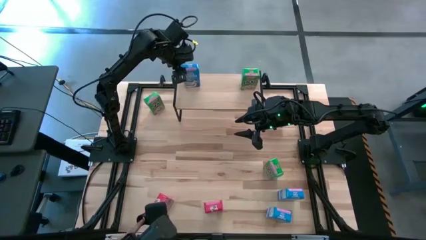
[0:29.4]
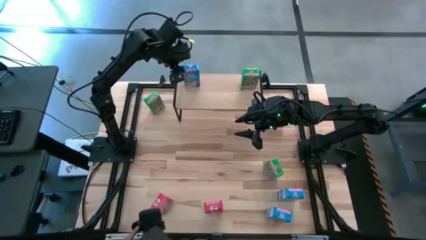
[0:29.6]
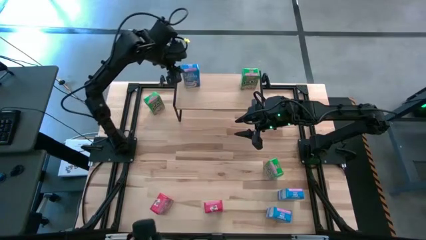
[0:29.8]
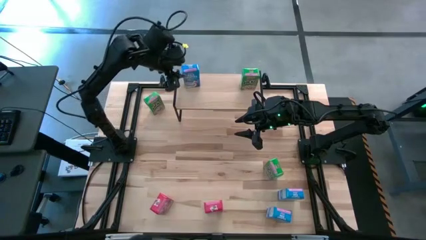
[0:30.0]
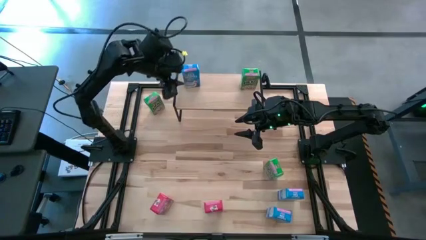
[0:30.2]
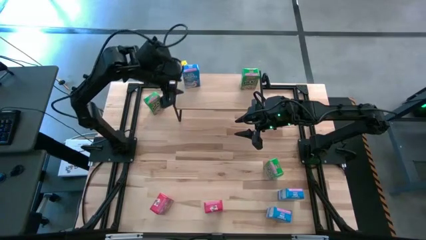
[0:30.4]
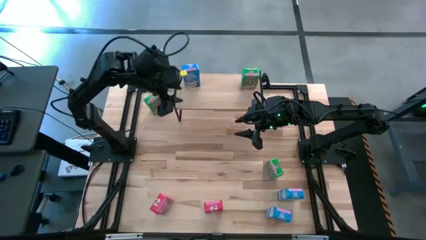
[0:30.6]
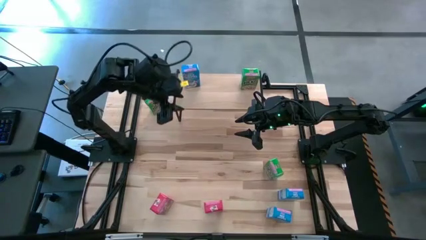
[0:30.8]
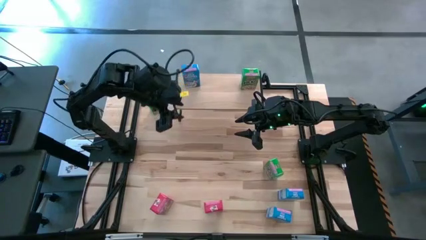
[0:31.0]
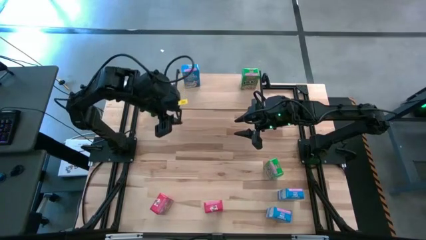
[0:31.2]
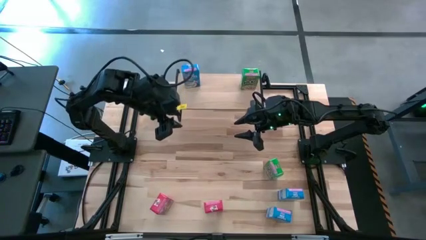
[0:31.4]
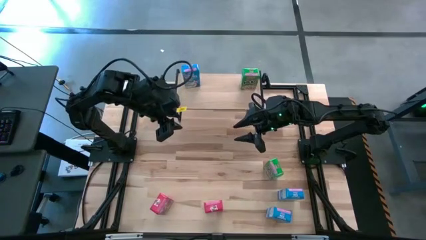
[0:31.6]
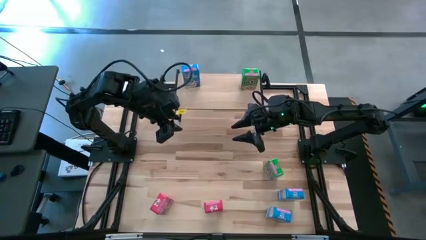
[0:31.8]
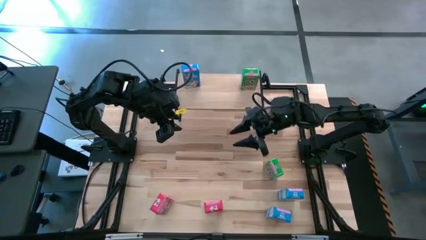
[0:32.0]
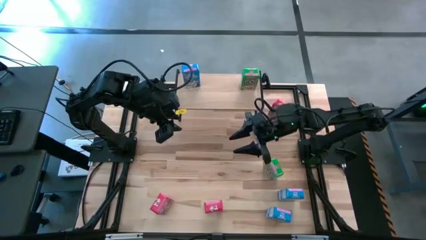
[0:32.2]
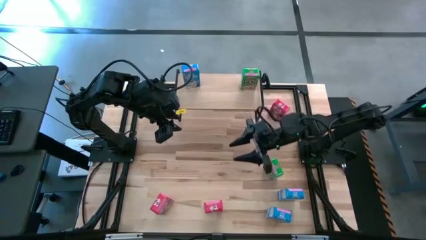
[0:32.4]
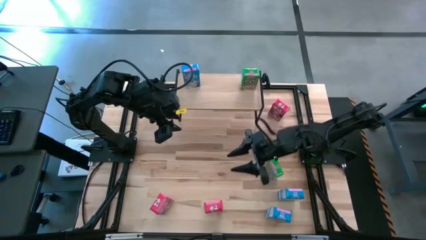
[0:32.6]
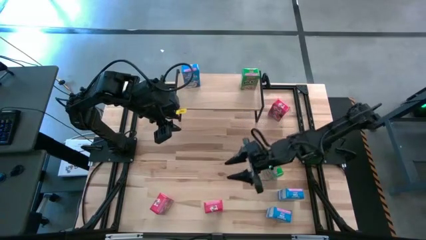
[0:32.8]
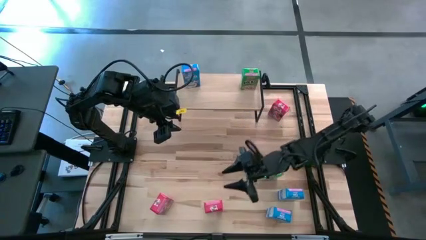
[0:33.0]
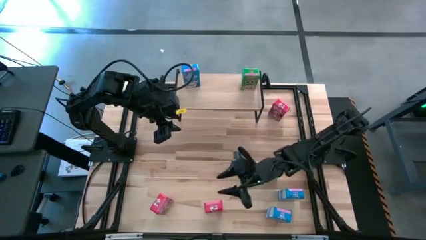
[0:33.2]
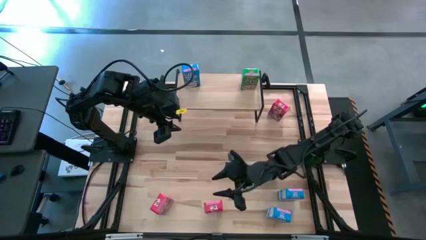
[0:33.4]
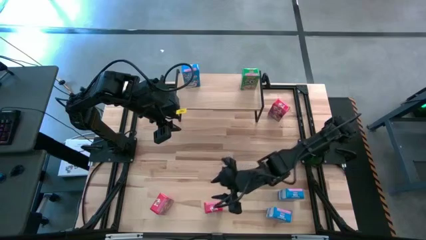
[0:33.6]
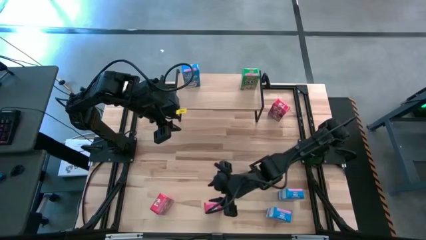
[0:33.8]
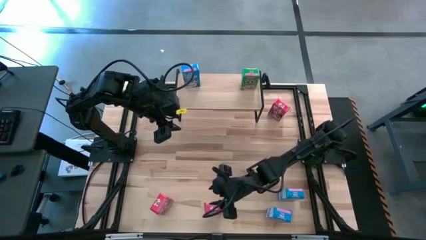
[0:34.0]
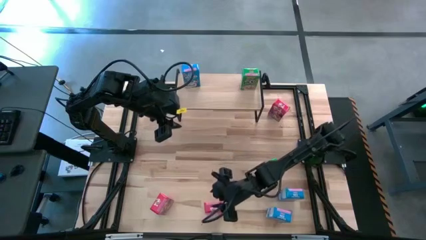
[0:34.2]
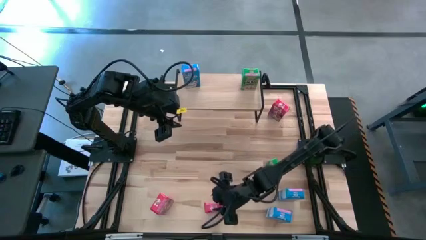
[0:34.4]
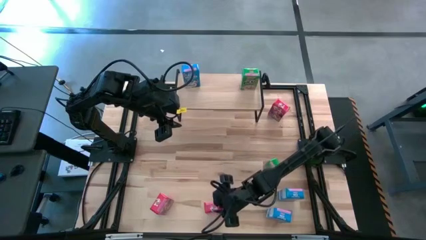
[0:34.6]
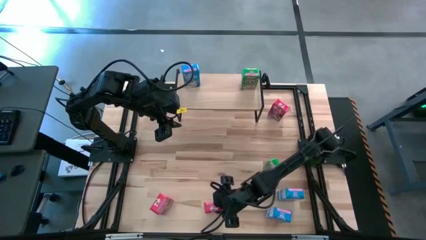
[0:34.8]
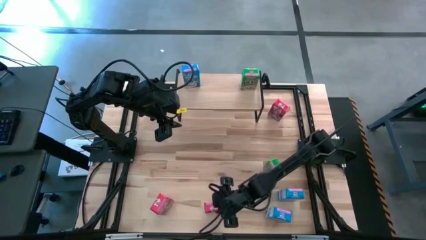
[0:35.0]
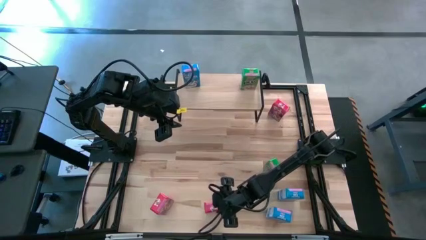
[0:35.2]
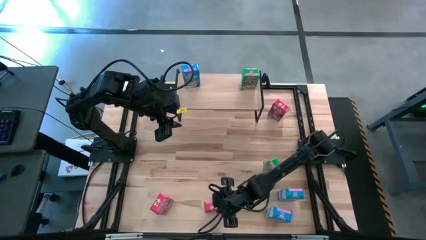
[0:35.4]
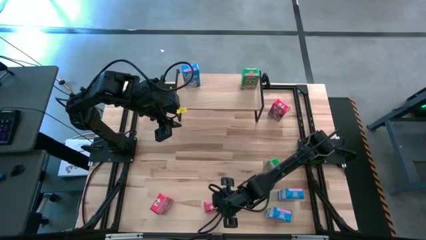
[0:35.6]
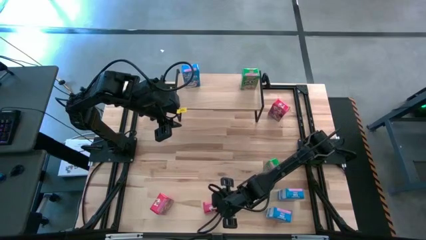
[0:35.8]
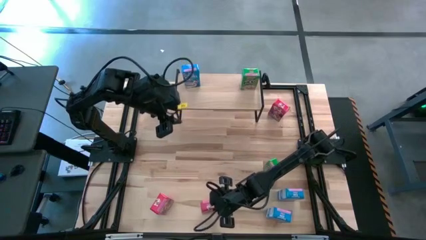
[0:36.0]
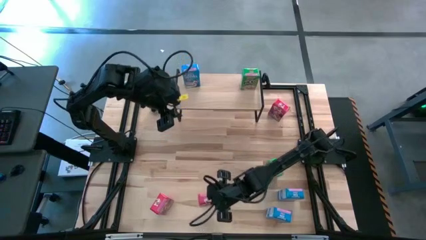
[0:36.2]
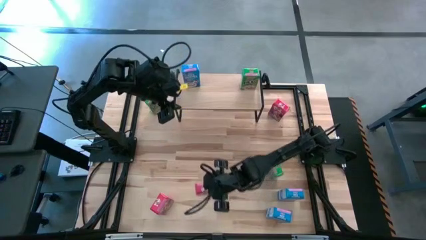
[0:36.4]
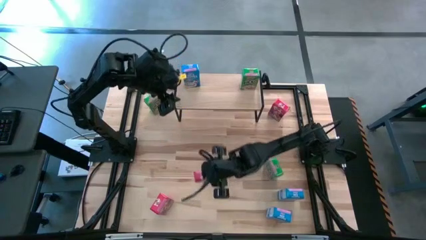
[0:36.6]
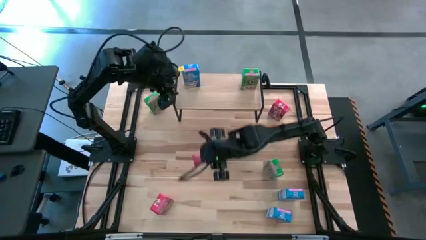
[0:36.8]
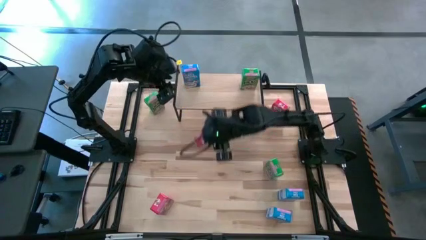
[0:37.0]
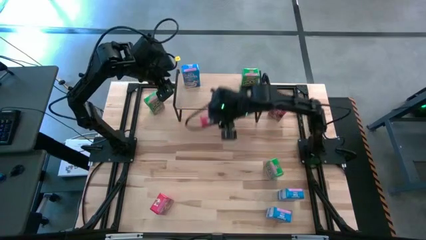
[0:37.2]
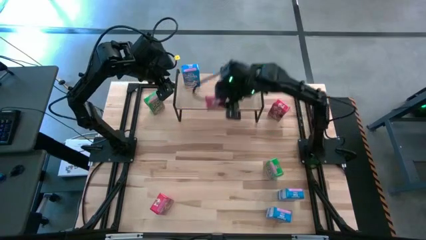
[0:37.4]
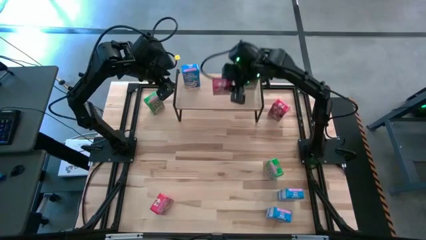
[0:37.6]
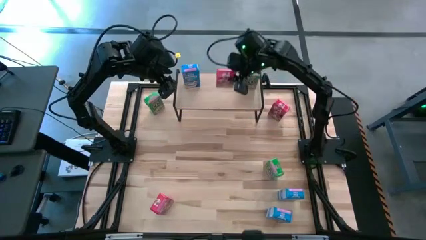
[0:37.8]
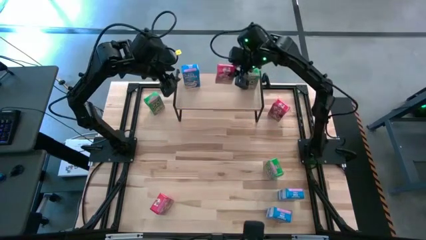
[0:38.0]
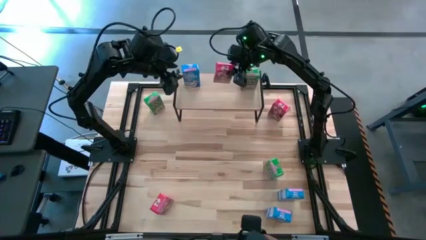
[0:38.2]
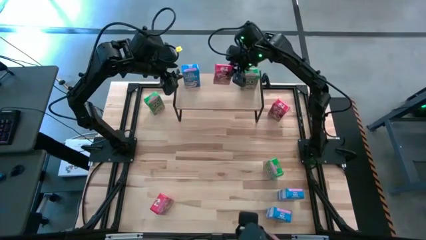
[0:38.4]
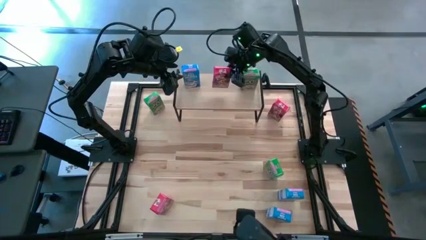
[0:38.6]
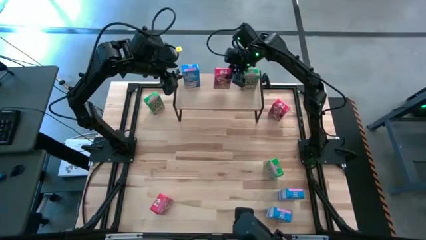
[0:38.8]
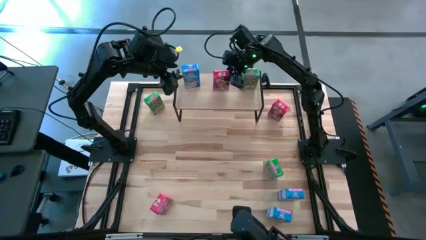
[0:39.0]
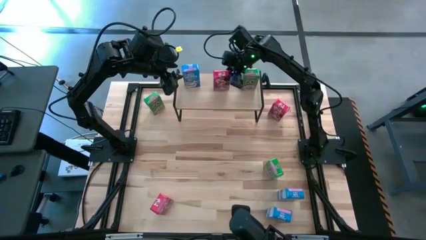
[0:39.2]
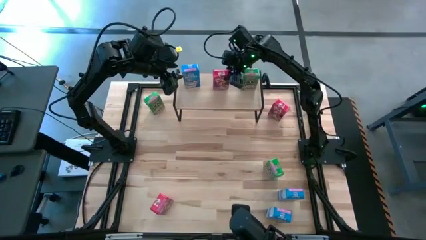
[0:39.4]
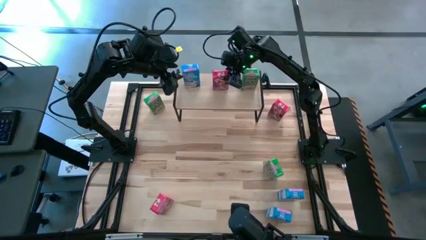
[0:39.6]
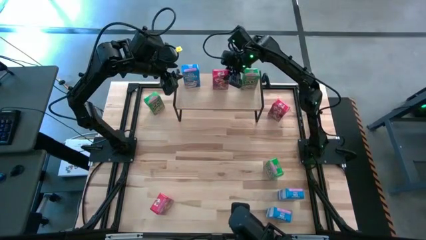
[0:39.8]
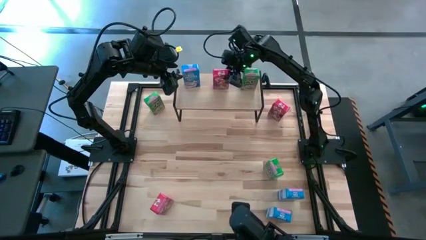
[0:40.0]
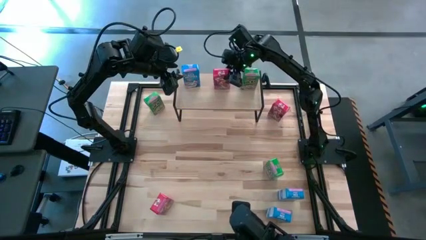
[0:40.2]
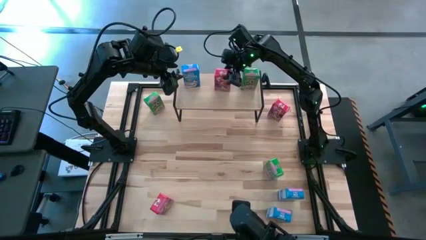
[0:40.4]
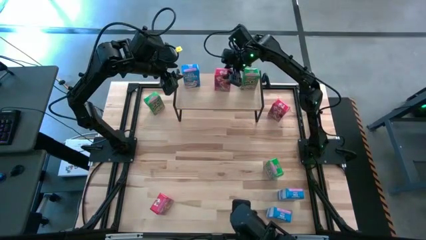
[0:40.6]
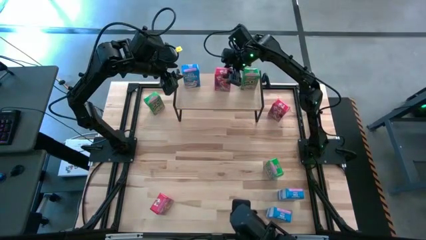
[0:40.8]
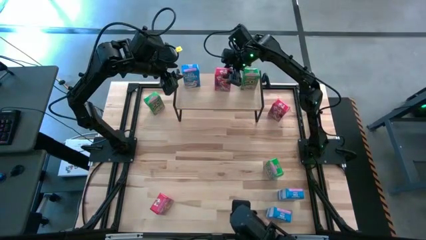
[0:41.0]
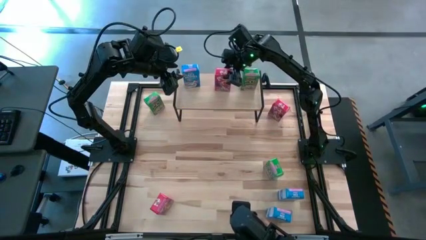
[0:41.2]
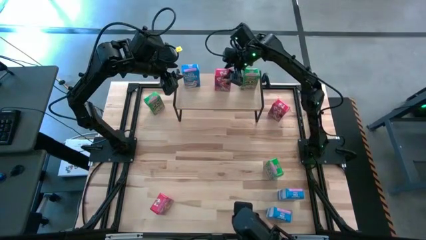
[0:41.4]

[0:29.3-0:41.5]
Task: Stack cereal on shelf
Put the bottom right red cereal box on the shelf

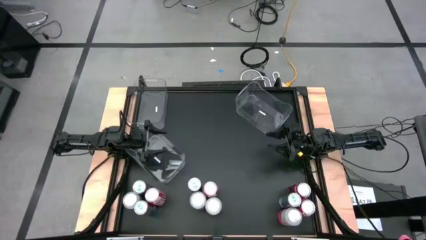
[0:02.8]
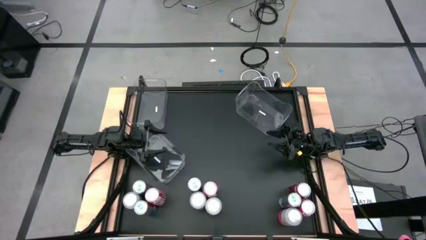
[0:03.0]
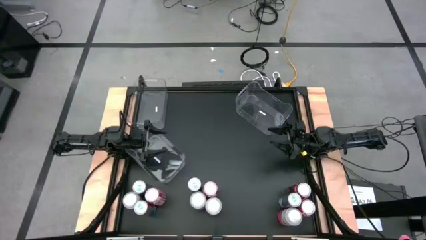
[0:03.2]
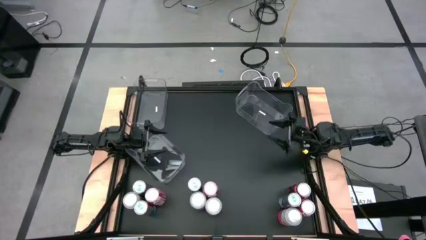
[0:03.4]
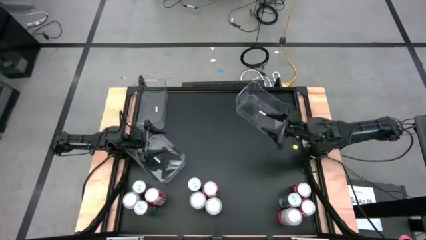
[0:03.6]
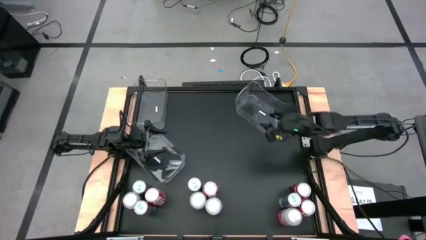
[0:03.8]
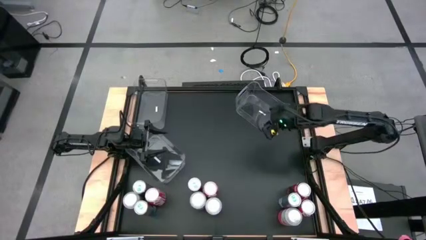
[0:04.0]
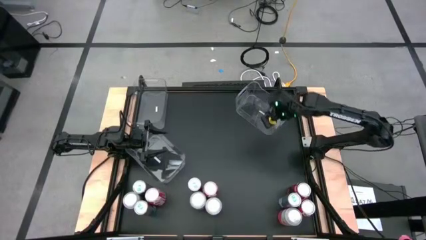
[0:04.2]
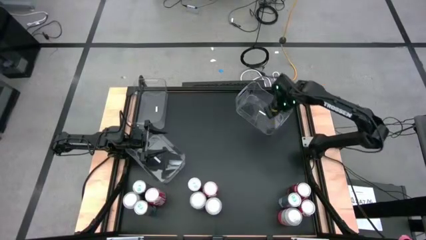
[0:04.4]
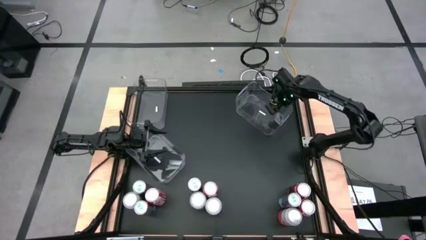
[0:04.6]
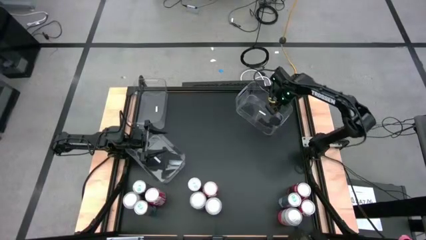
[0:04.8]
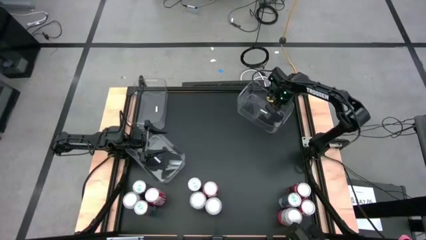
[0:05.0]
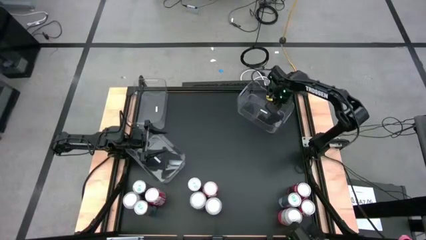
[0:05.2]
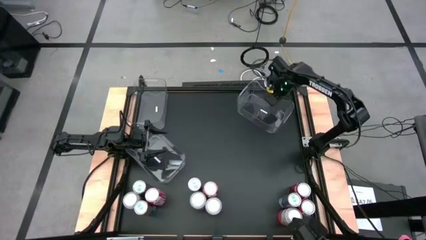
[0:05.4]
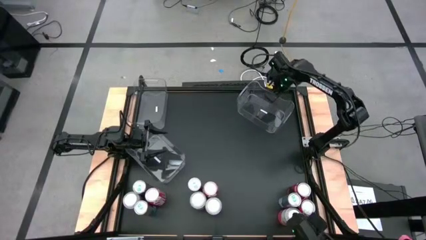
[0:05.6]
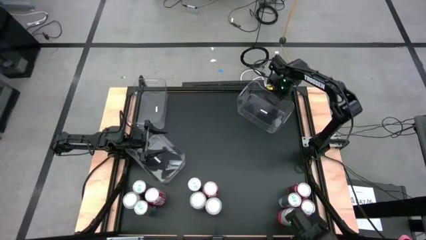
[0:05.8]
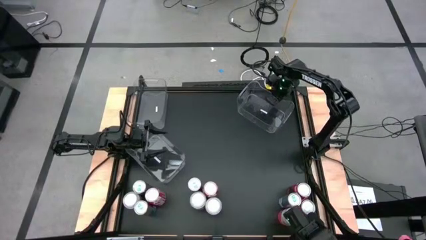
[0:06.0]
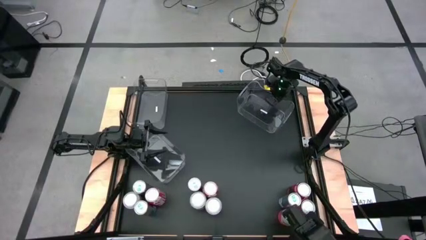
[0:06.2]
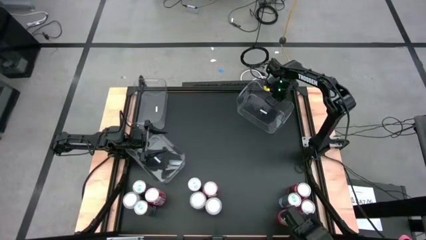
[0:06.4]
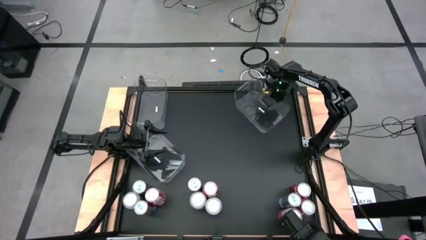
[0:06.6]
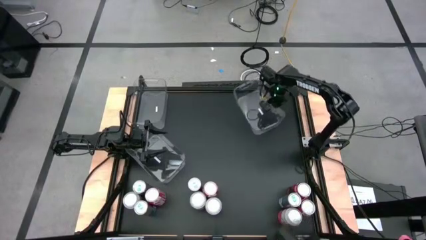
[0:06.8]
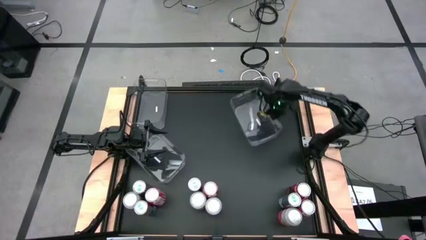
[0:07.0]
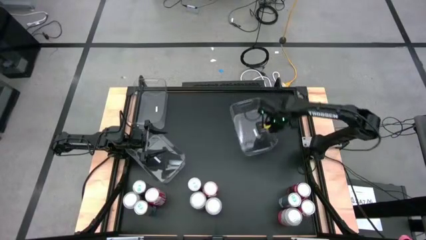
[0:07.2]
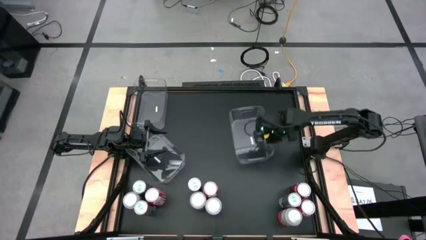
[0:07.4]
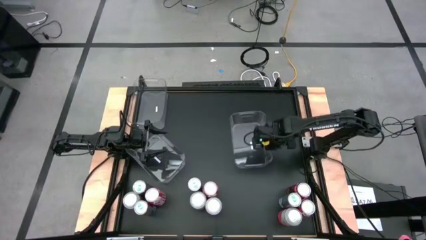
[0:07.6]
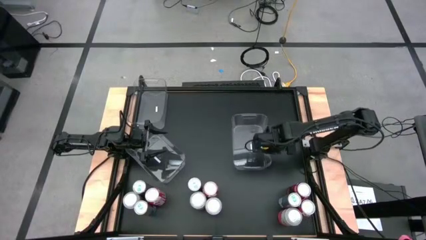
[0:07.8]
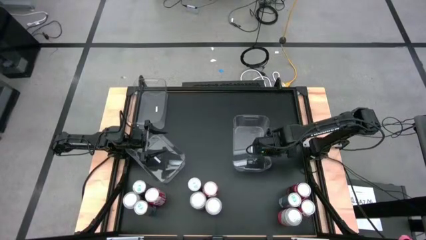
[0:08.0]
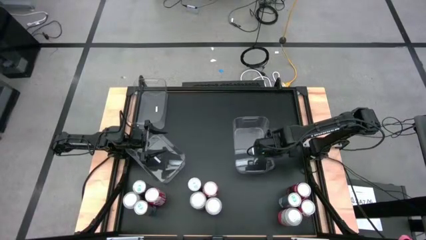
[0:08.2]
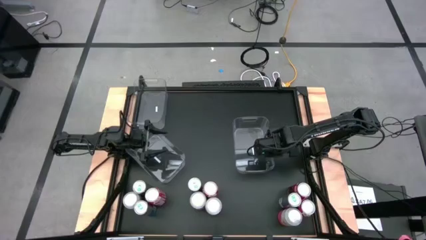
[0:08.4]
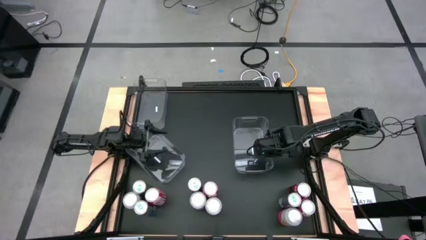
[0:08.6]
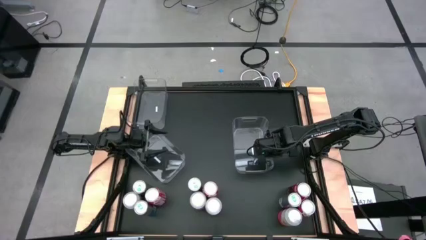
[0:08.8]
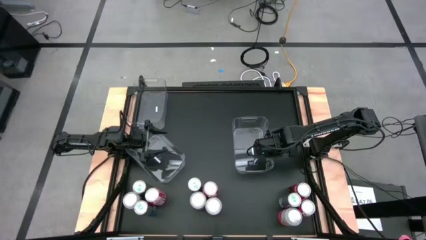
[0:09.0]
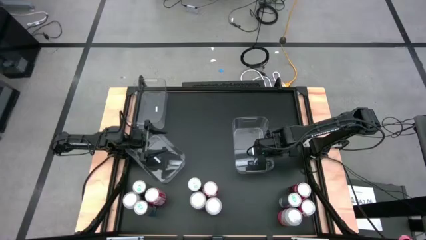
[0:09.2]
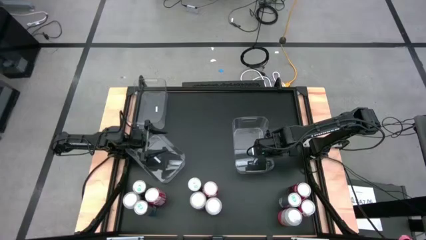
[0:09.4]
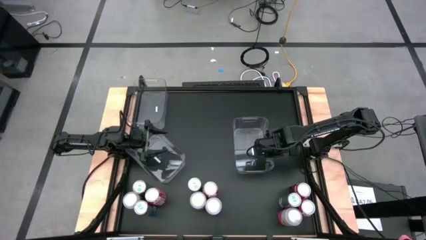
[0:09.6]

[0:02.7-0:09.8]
Task: Sort soda cans
Move the top right transparent bin to the middle right
